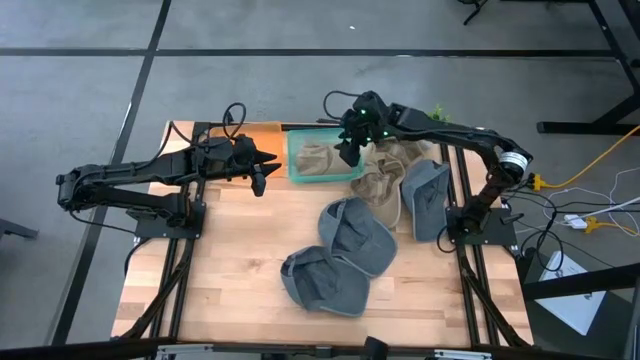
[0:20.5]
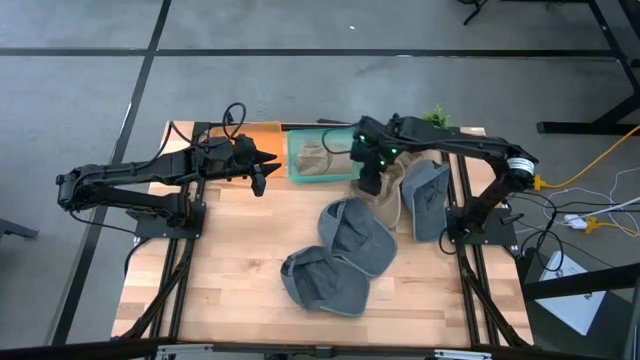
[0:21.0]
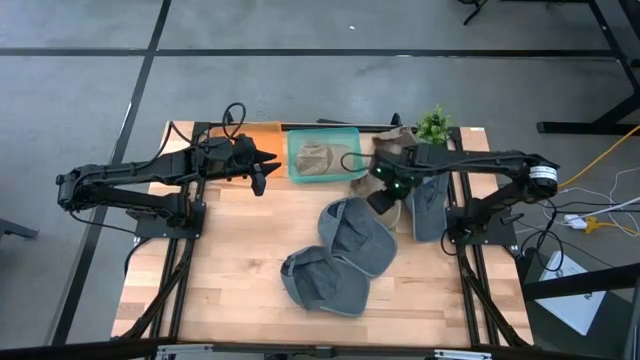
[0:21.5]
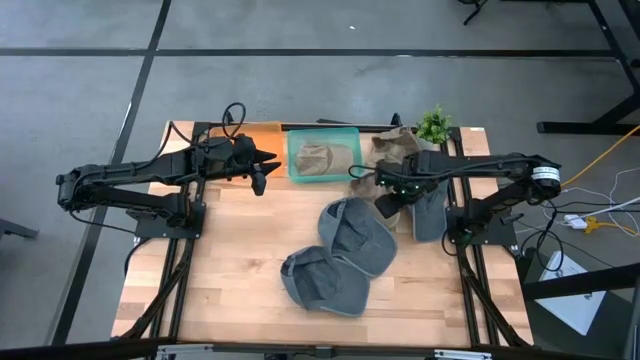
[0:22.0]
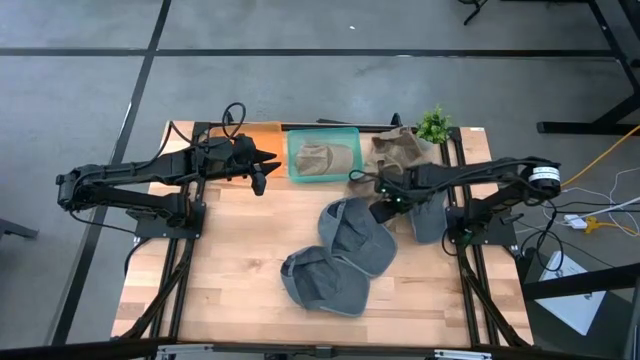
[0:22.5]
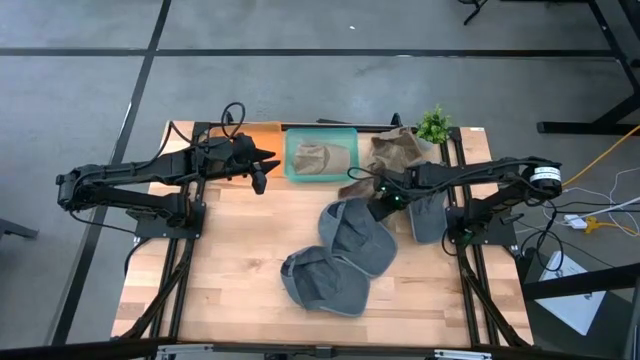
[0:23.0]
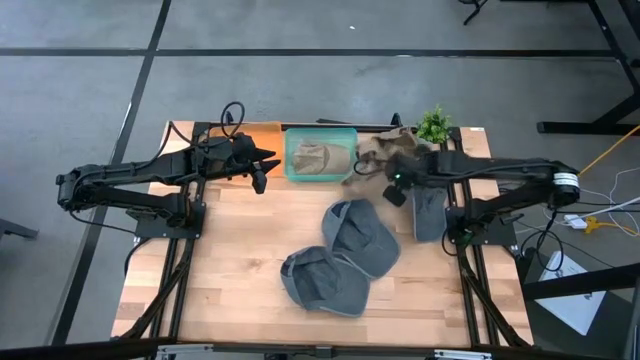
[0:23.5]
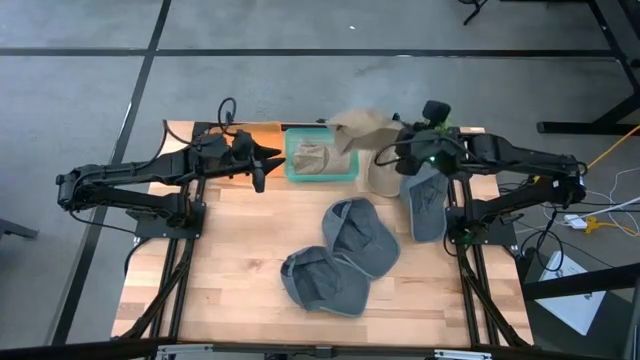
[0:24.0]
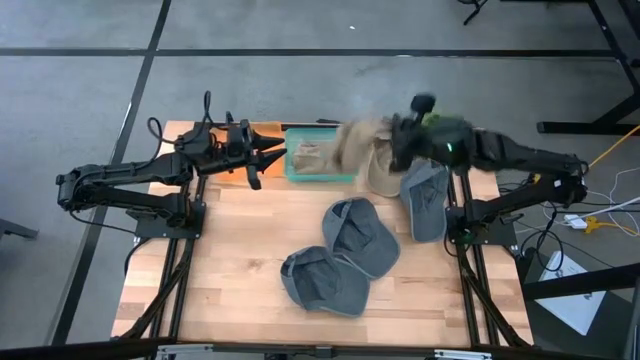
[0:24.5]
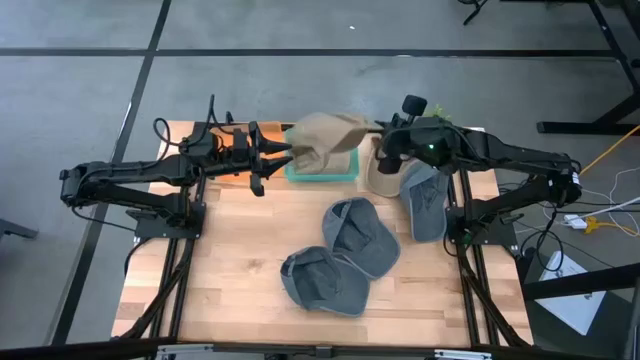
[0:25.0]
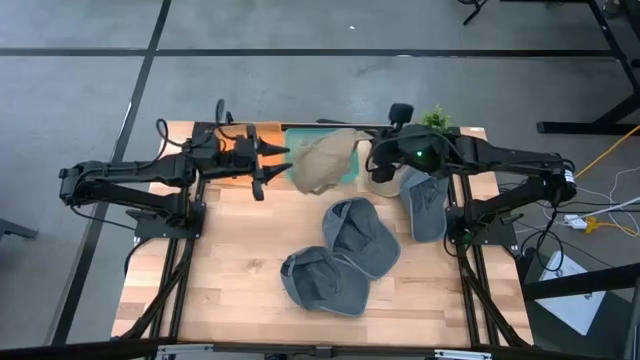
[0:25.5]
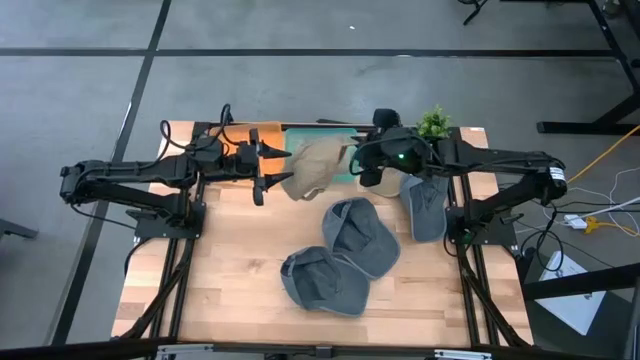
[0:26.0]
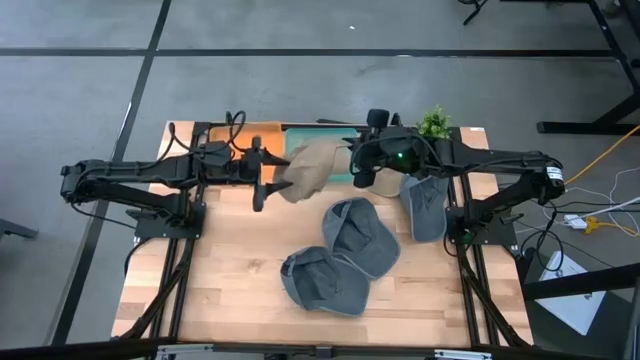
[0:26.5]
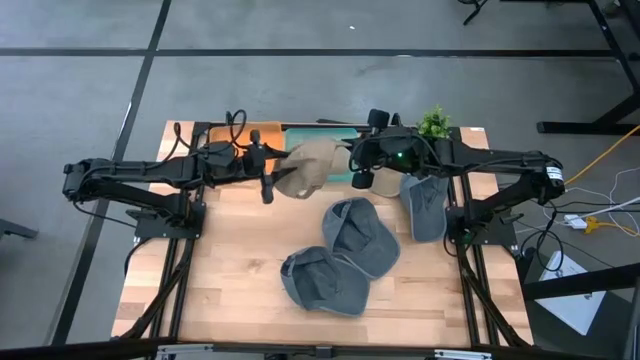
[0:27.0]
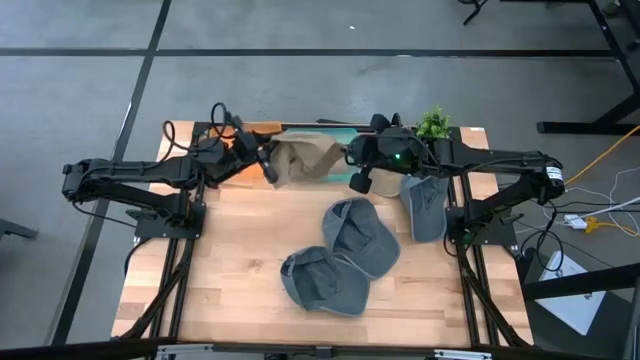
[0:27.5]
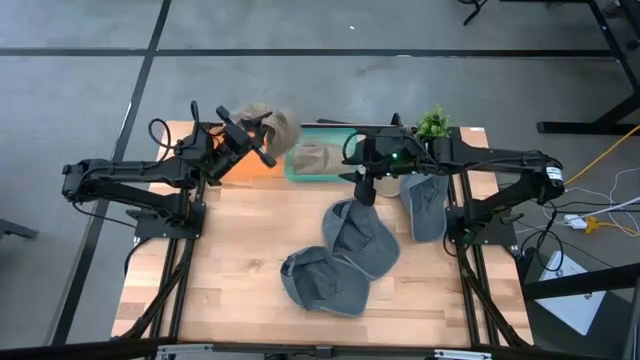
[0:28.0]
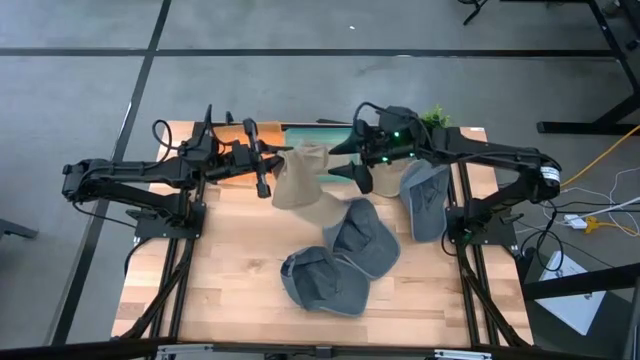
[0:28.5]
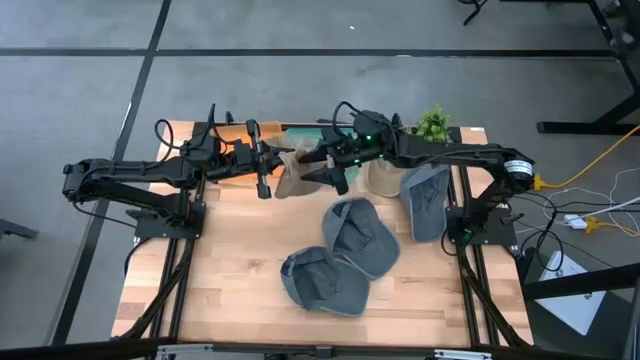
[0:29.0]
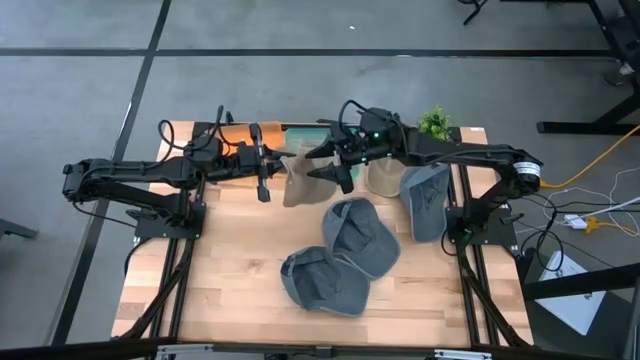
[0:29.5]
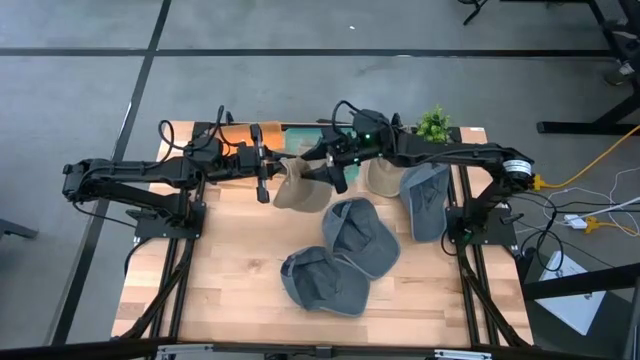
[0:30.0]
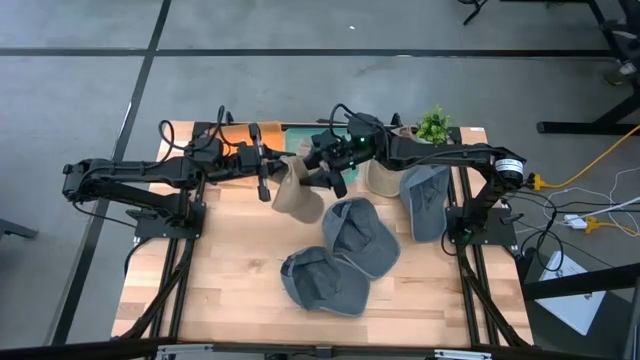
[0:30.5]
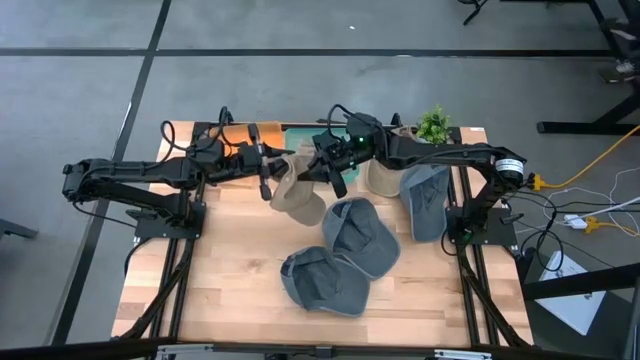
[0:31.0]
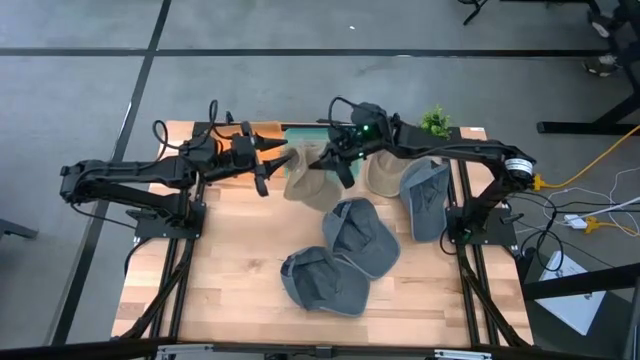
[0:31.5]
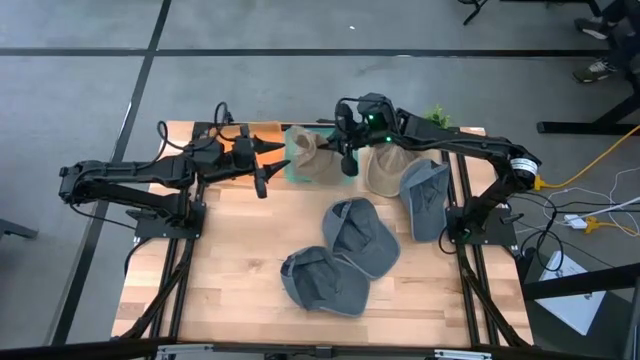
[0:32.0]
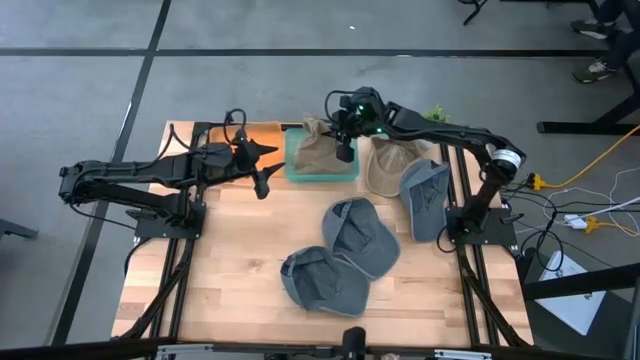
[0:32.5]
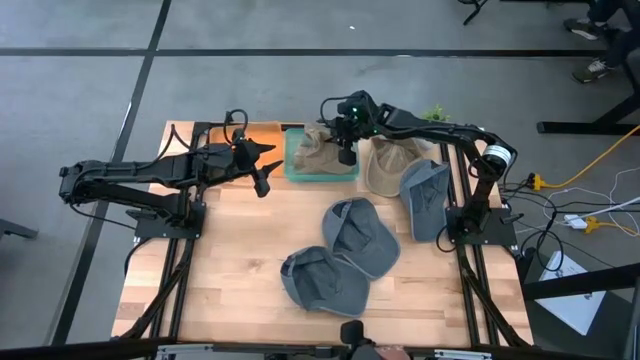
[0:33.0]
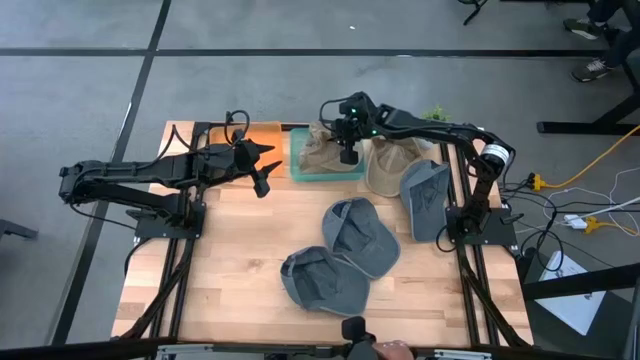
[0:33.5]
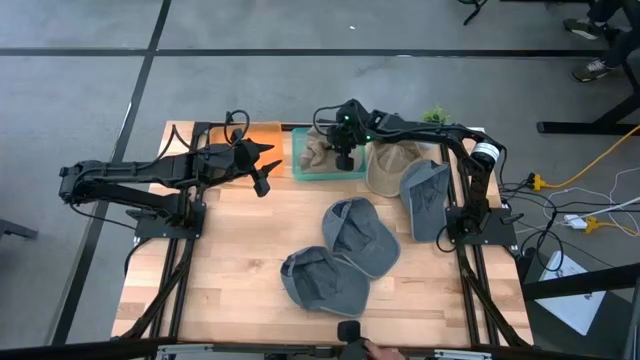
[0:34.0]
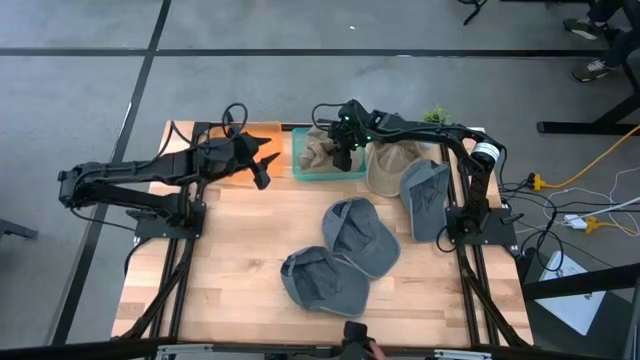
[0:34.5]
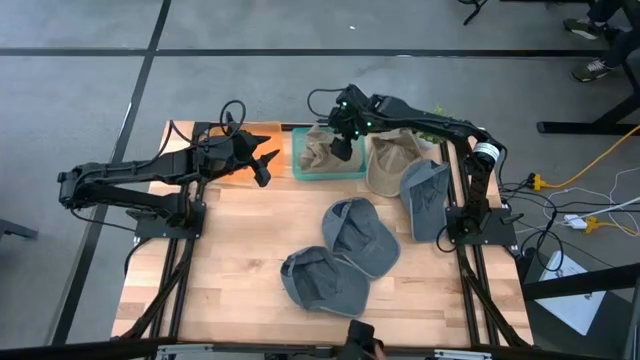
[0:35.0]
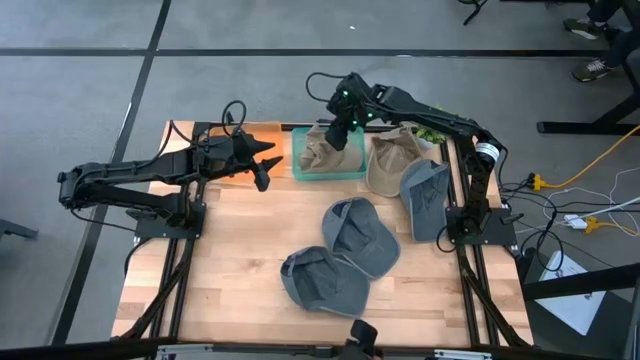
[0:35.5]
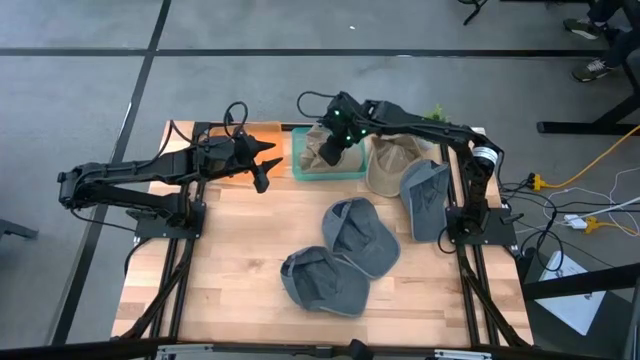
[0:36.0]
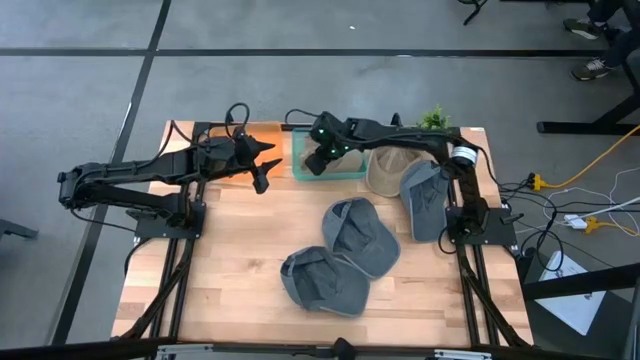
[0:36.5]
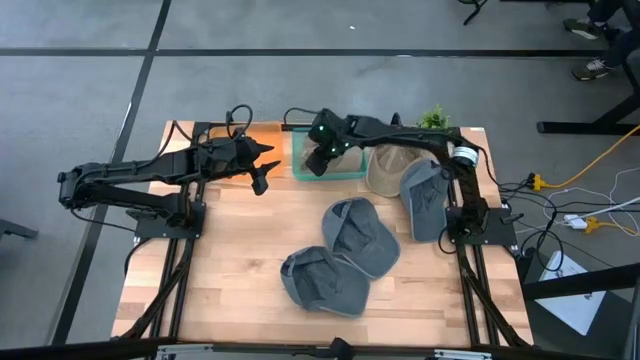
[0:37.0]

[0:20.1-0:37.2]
Task: Pick & Place hat
Put the bottom brown cap into the green bin

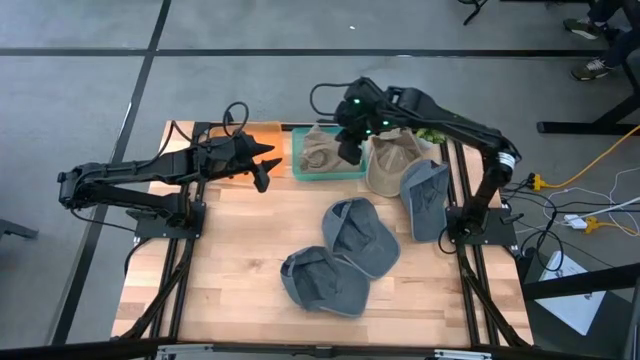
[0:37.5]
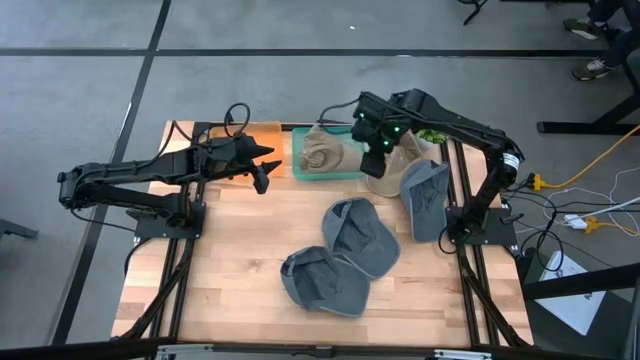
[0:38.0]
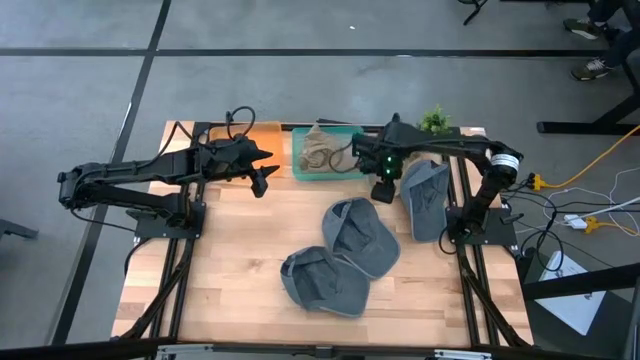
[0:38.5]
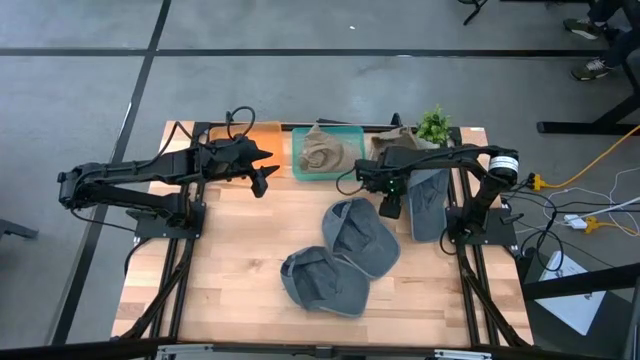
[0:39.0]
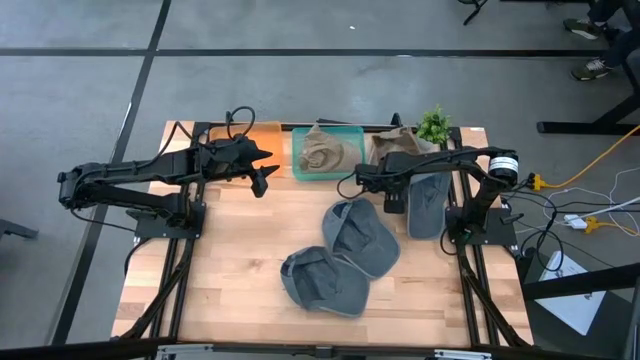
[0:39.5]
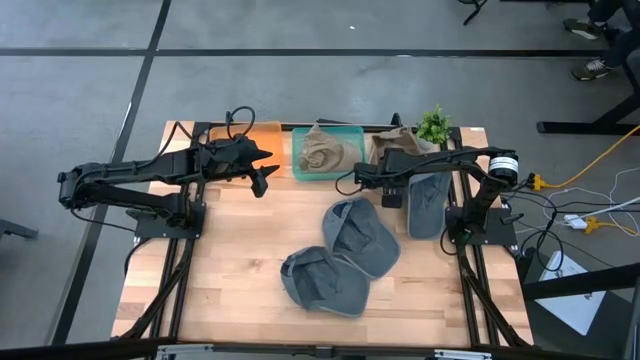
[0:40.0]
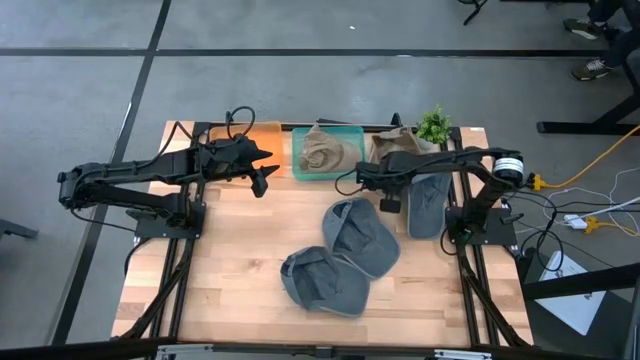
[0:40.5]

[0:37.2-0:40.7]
Put the brown cap into the green bin

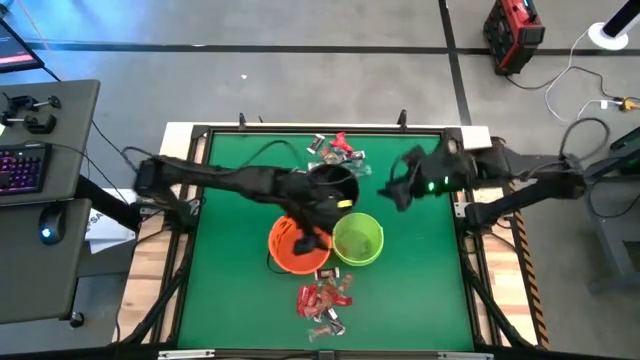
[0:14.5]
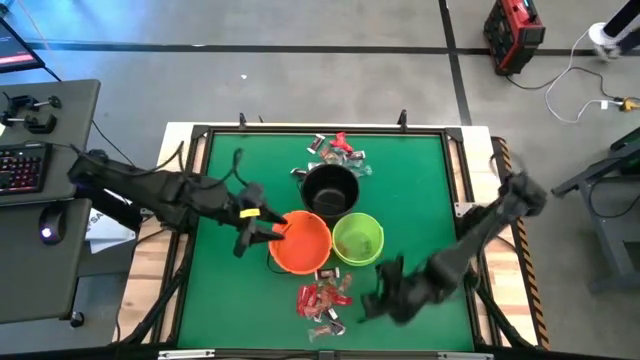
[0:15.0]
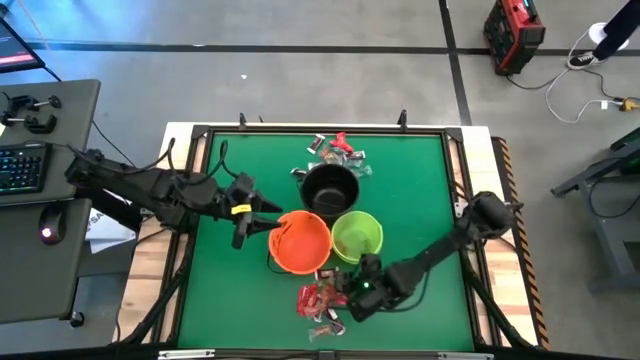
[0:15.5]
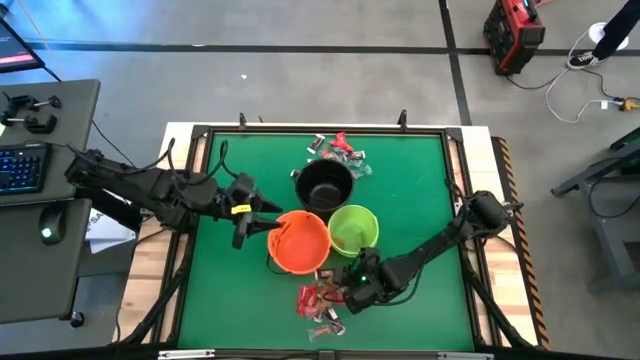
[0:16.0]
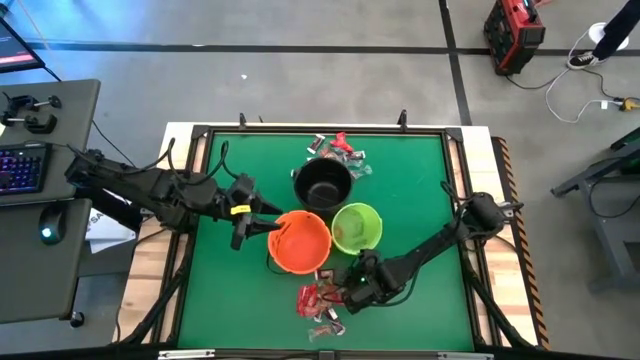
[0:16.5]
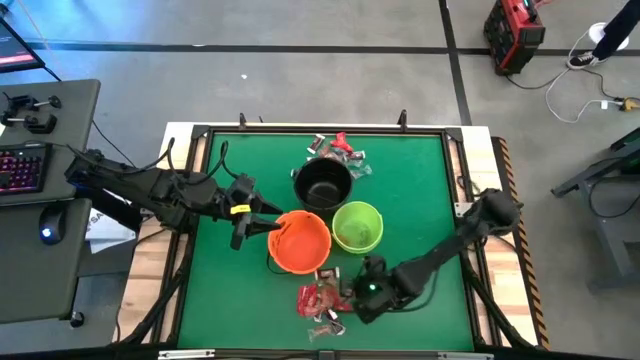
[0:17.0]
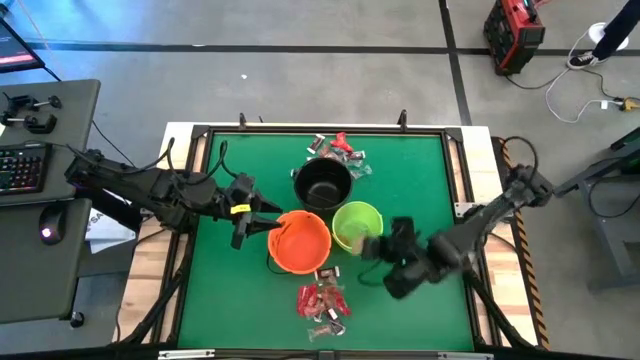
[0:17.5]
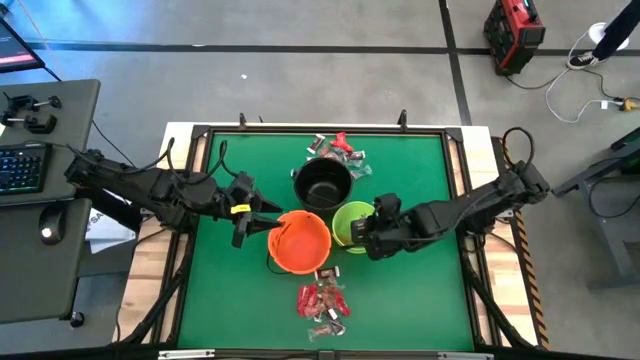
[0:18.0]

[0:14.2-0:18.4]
Task: Sort candy by brand, put in halloween buckets
Put the orange gummy into the green bucket
